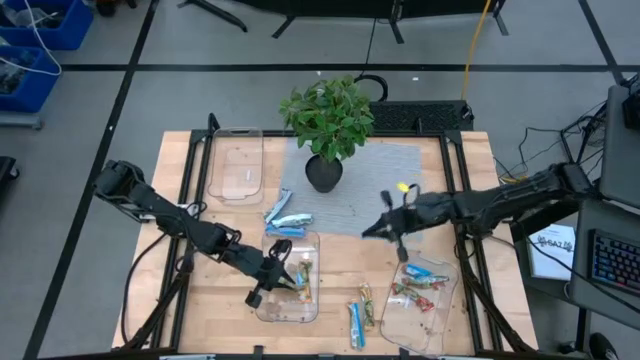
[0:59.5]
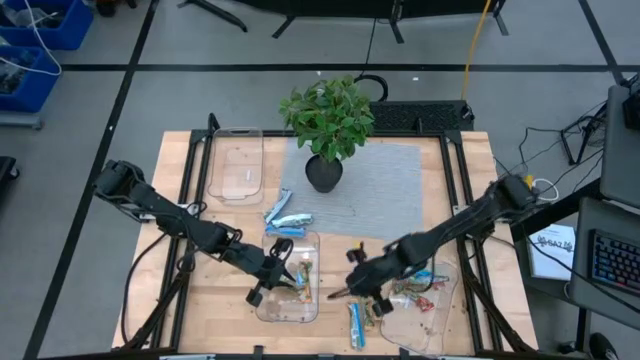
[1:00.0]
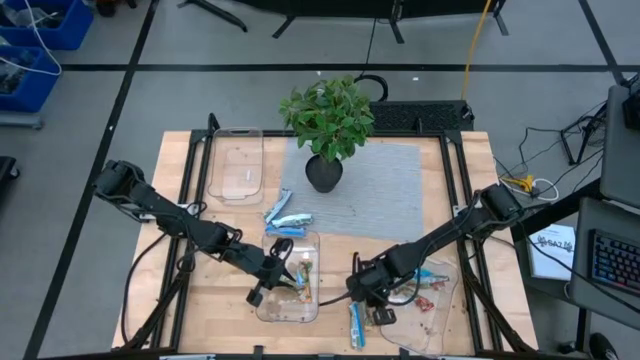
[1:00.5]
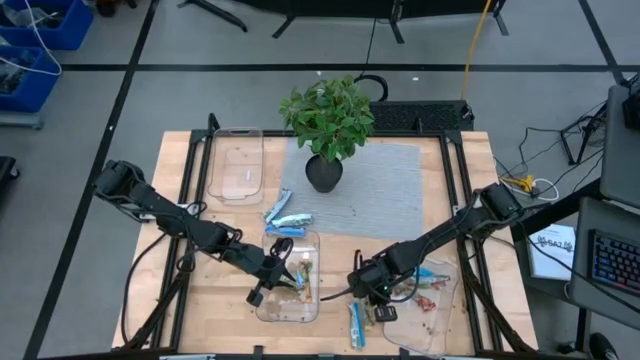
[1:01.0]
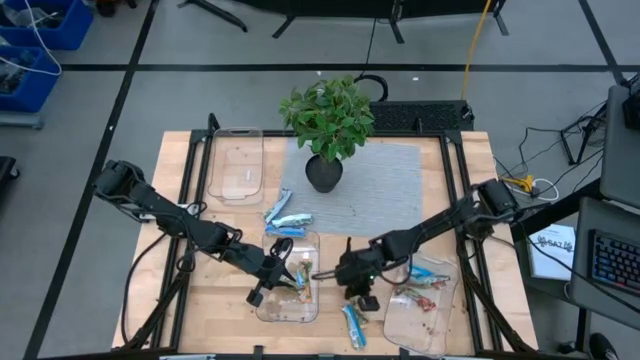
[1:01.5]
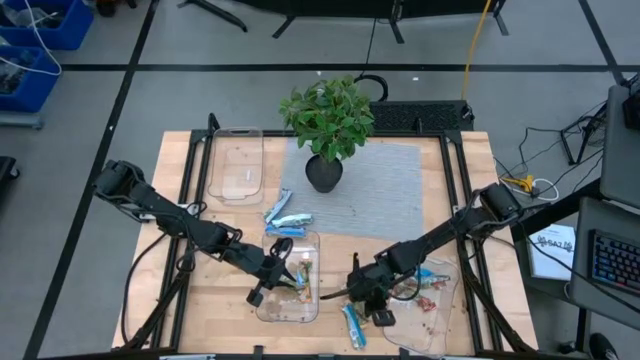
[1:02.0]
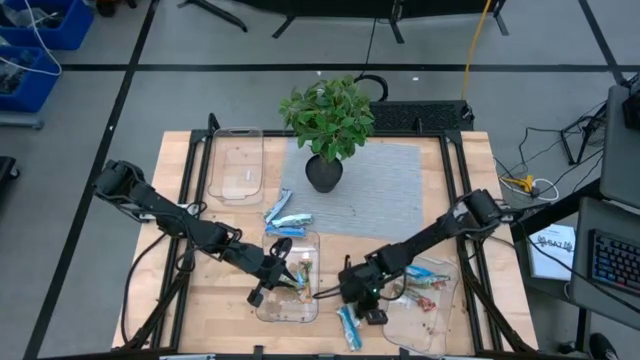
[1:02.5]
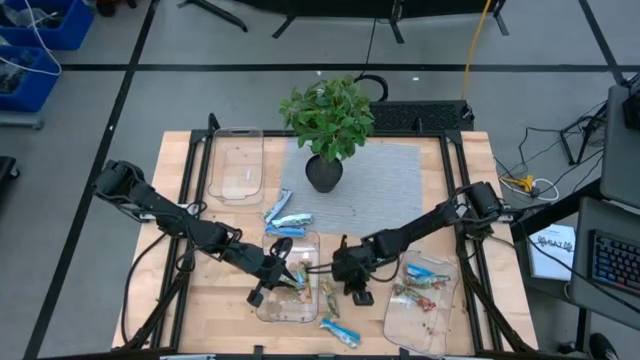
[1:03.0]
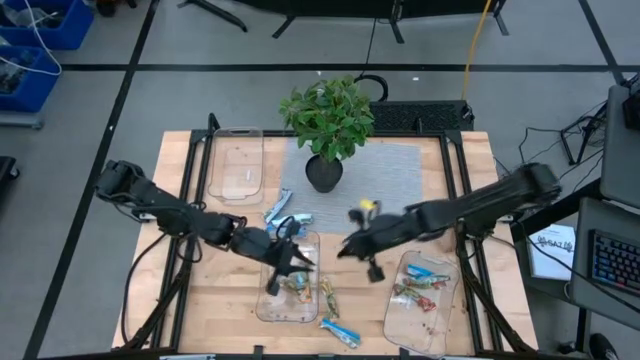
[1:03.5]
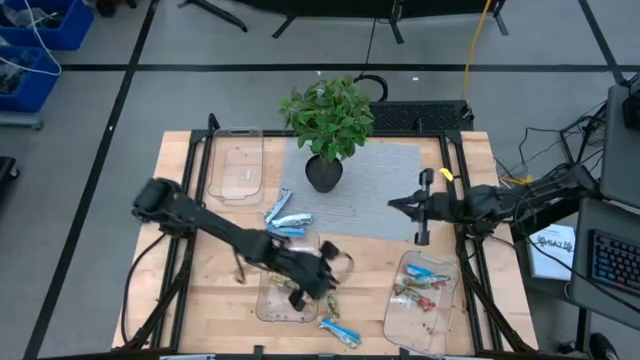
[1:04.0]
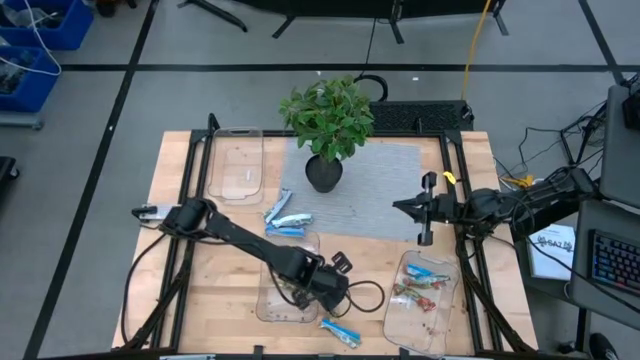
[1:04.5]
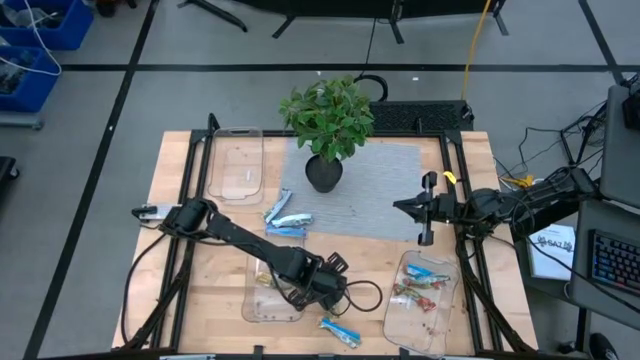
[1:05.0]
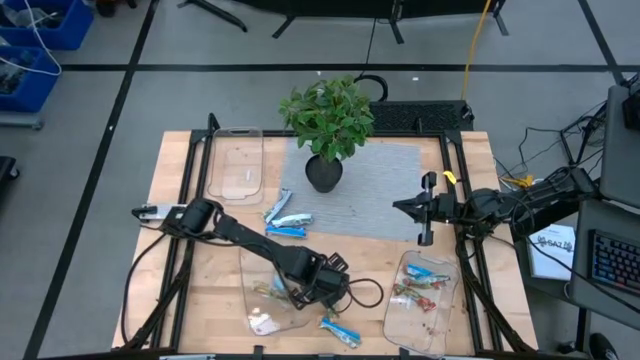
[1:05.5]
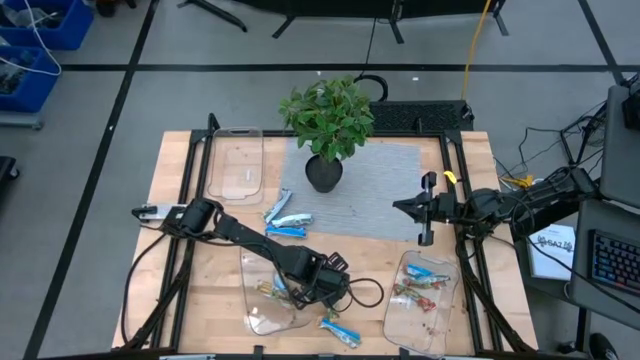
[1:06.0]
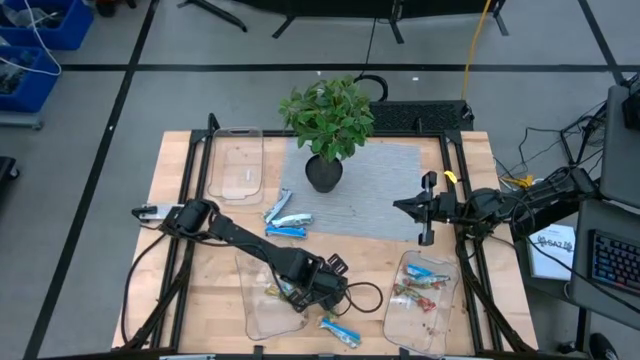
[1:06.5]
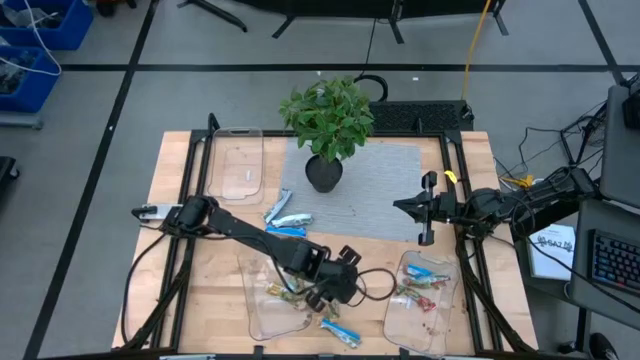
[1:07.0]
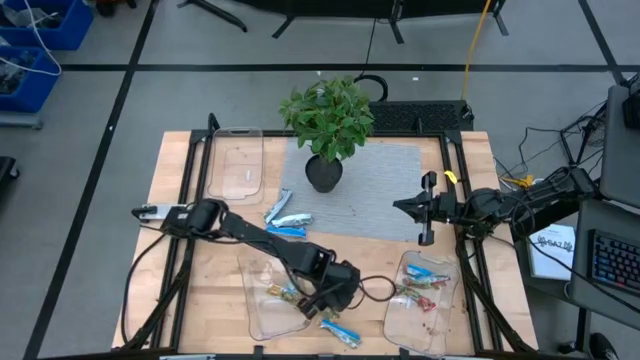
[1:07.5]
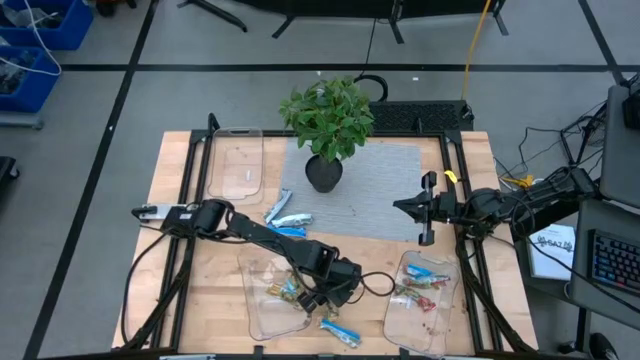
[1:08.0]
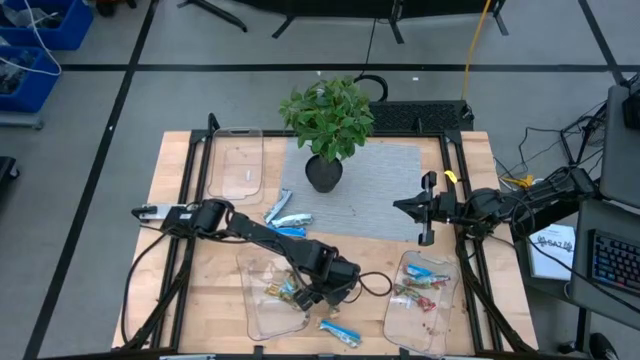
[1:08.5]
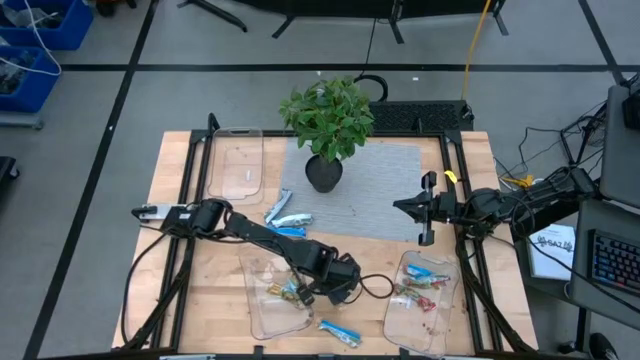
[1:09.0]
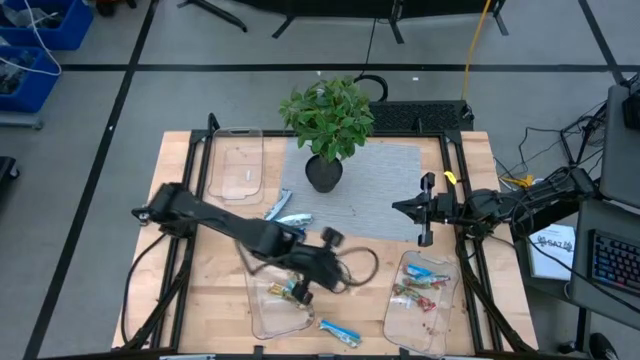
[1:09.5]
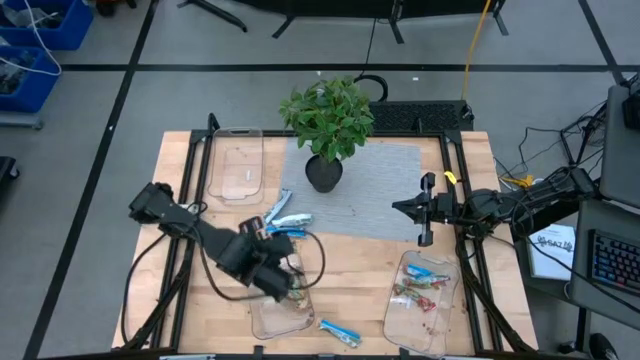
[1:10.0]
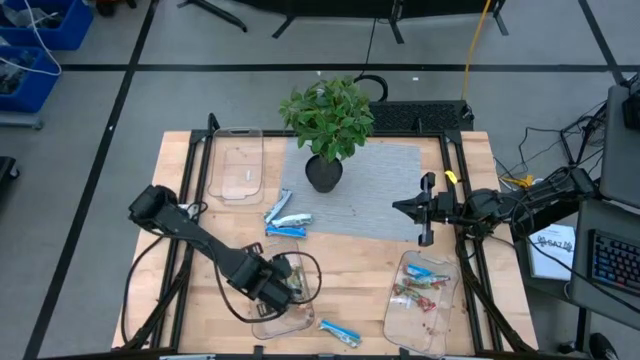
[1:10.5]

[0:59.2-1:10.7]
Task: Pick and place Granola Bars by type
Put the yellow granola bar into the bottom left transparent bin

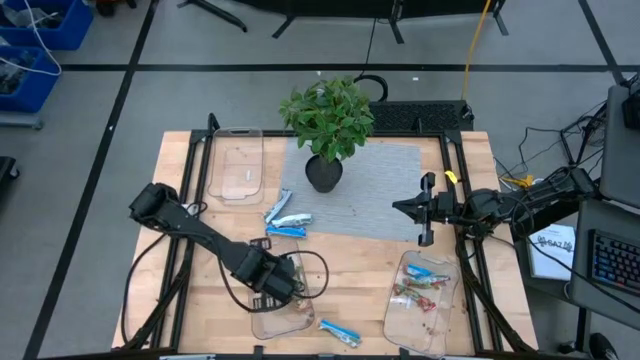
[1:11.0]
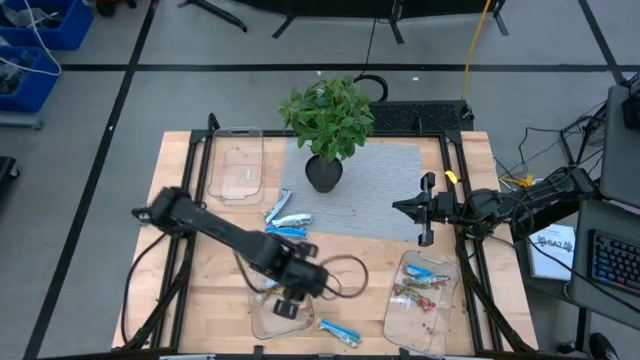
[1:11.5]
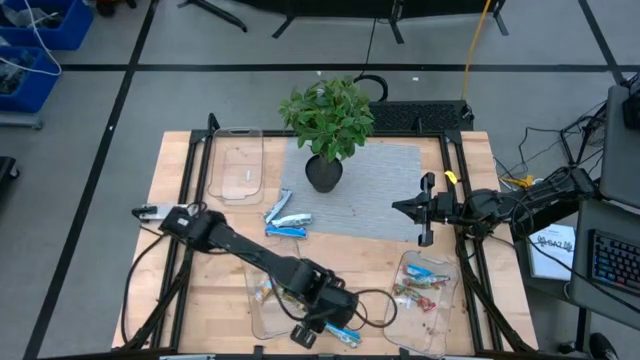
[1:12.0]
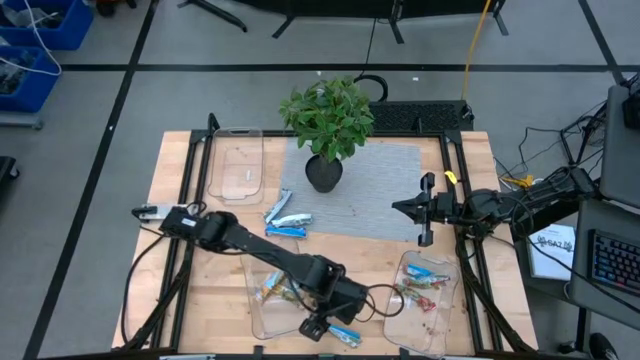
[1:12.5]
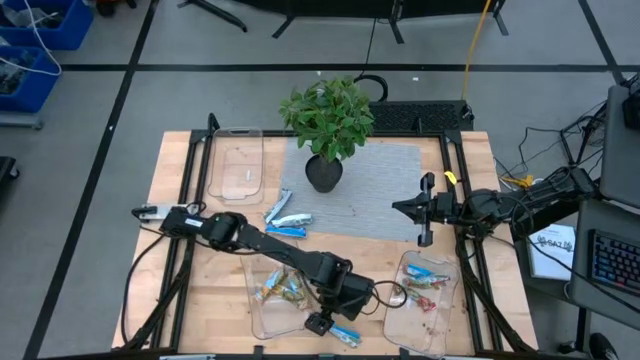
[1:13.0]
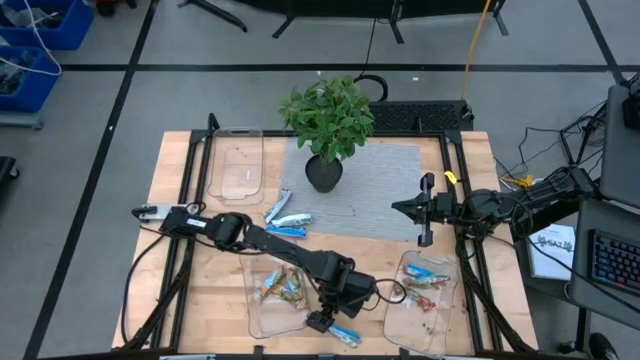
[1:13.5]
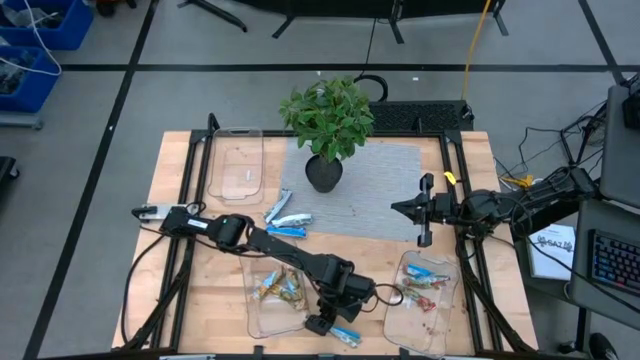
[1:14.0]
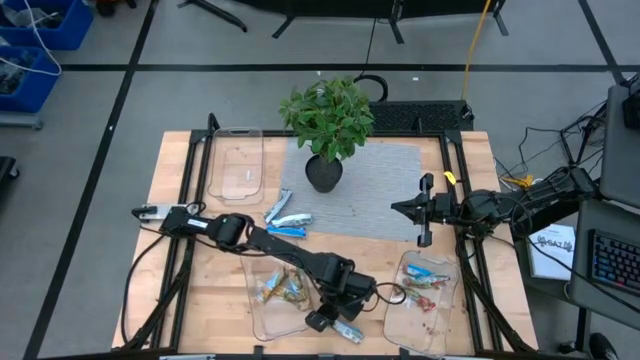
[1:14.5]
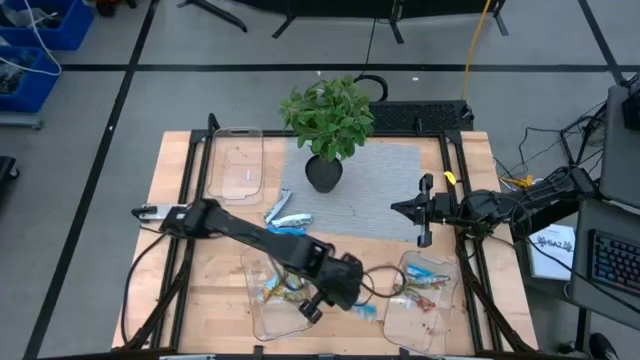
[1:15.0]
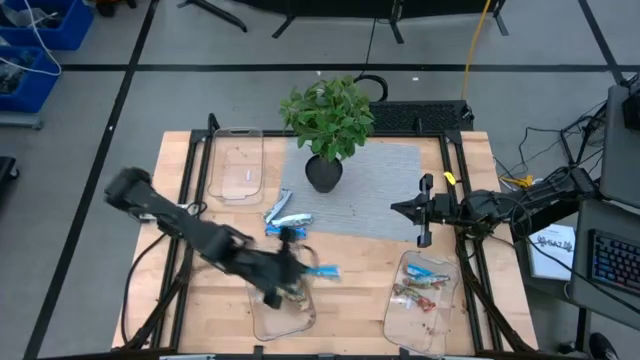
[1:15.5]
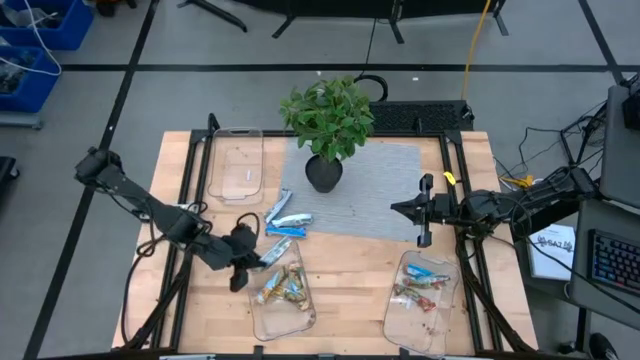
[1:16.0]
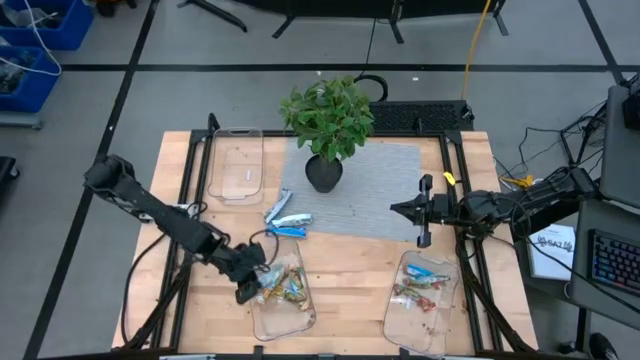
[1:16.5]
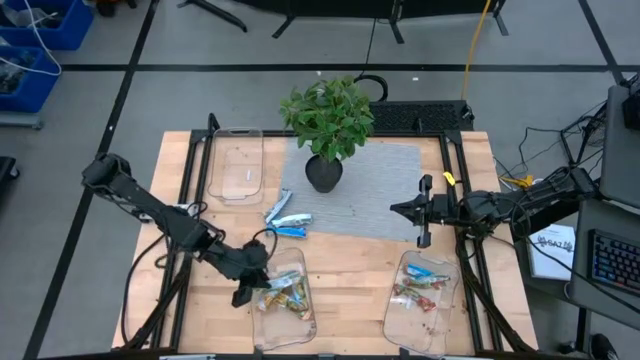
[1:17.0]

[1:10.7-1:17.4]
Put the yellow granola bar into the bottom left transparent bin

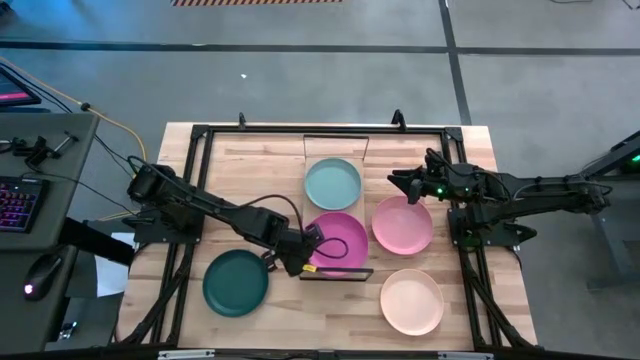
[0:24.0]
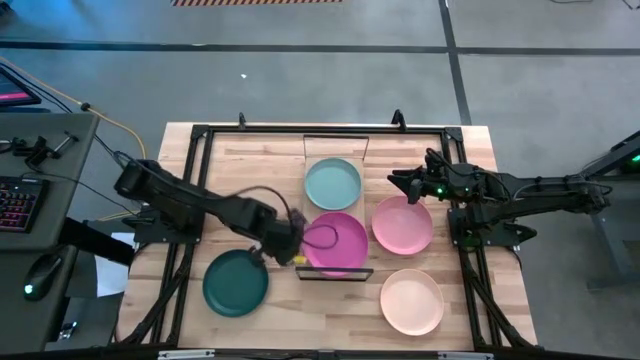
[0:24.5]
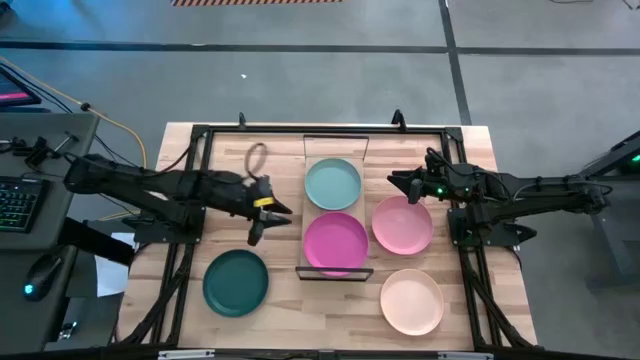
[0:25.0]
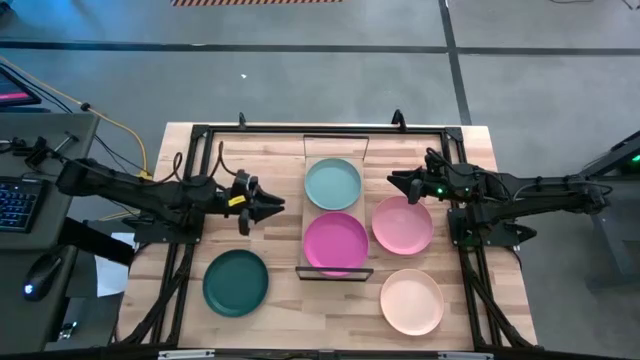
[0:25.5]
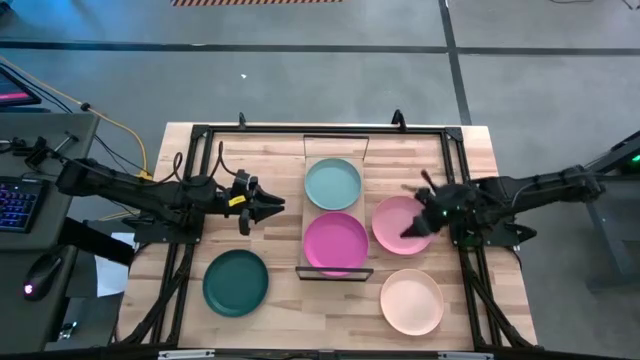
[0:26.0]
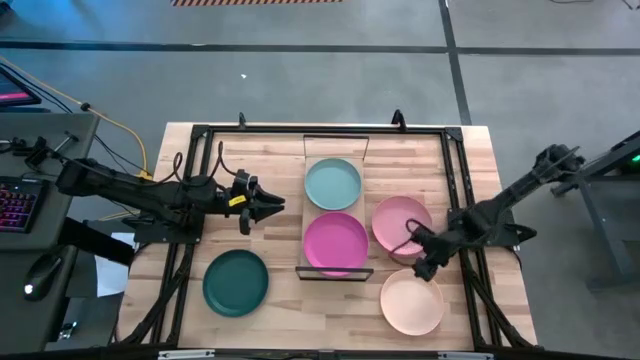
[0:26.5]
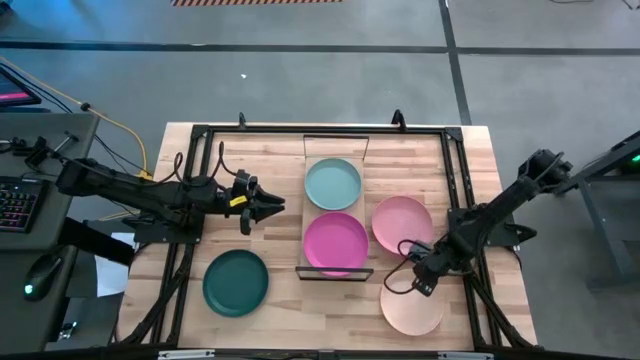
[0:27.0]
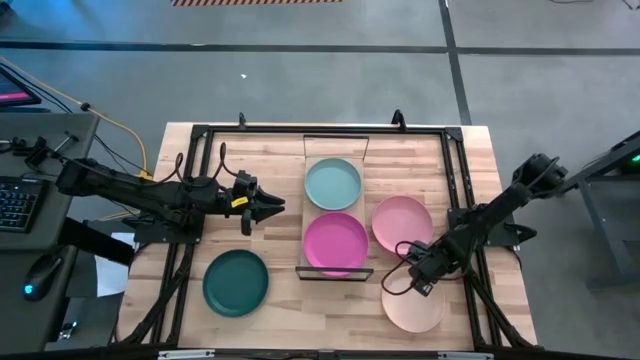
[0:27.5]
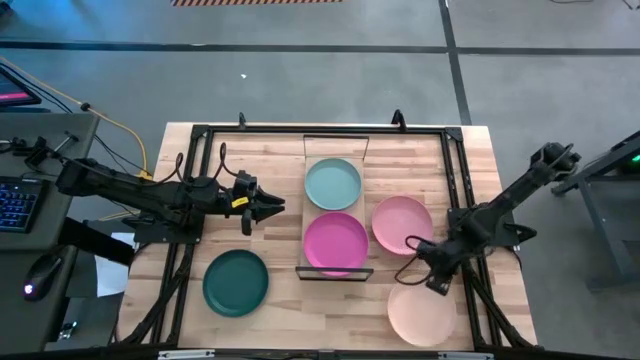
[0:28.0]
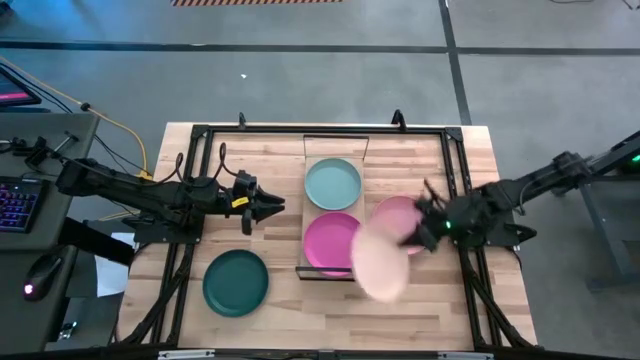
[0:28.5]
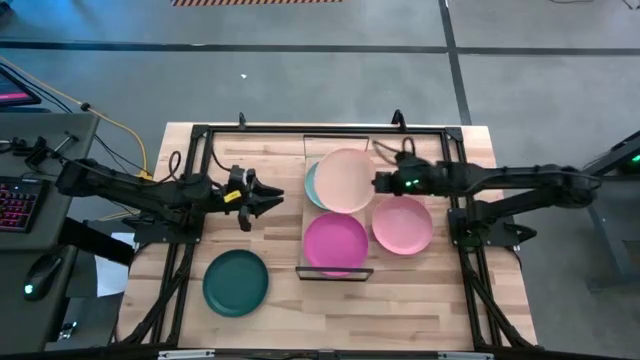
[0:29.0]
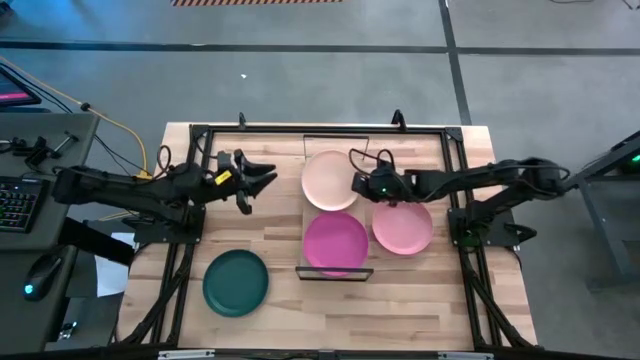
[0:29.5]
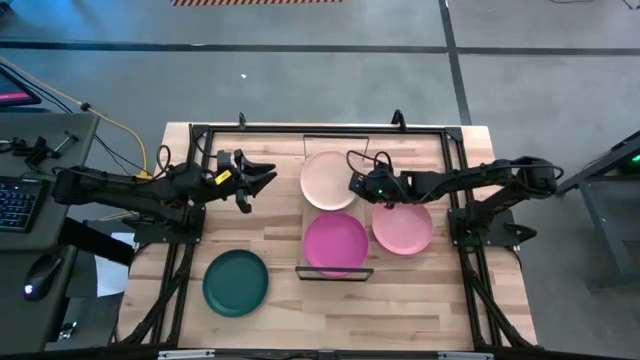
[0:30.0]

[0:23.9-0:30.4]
Task: Place and stack plates onto a shelf
Stack the white plate on top of the blue plate on the shelf
